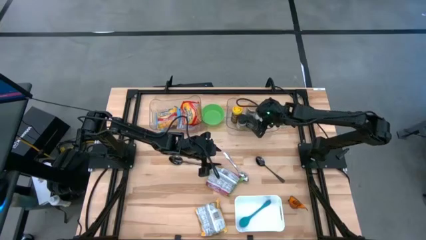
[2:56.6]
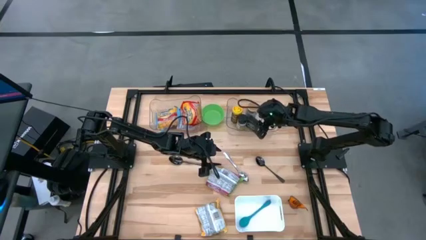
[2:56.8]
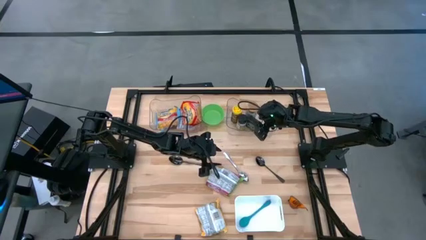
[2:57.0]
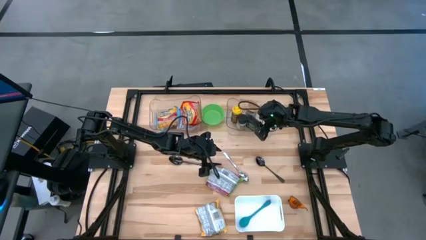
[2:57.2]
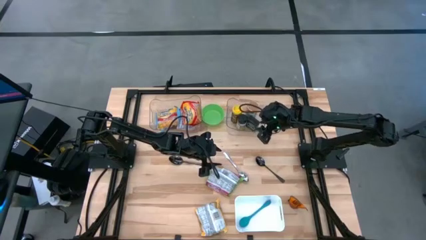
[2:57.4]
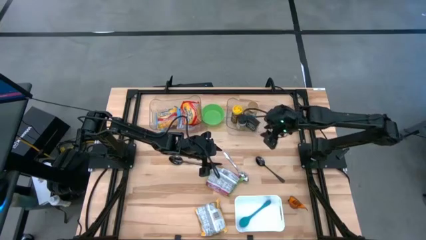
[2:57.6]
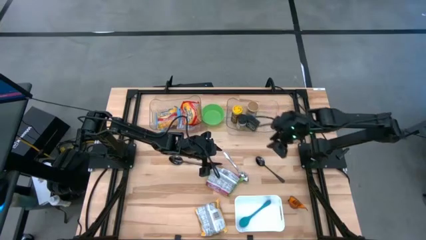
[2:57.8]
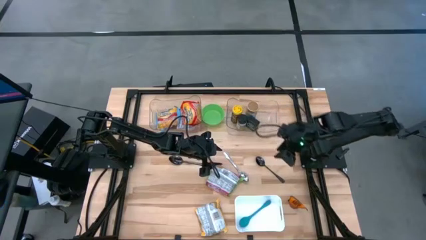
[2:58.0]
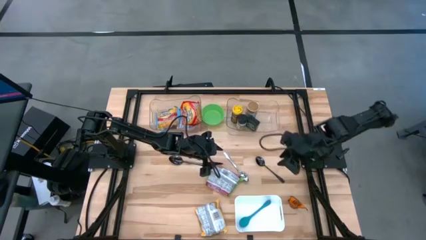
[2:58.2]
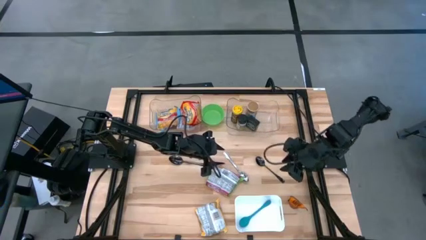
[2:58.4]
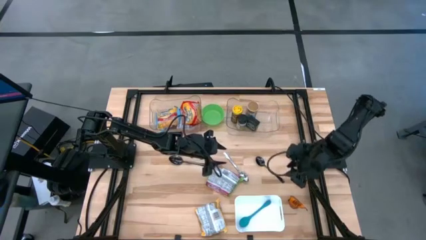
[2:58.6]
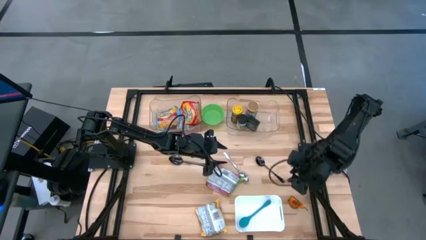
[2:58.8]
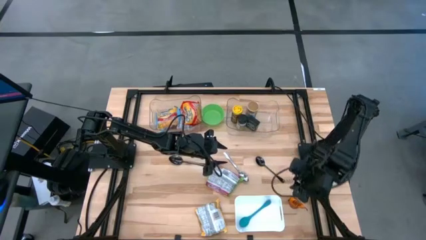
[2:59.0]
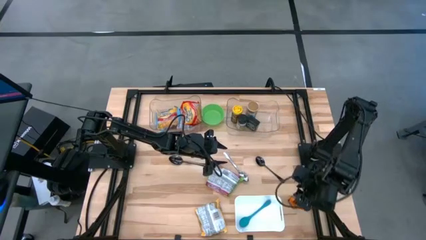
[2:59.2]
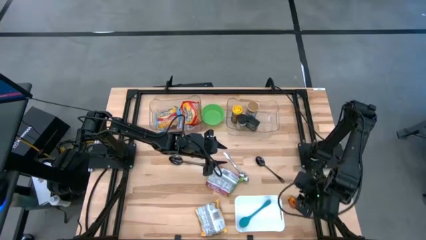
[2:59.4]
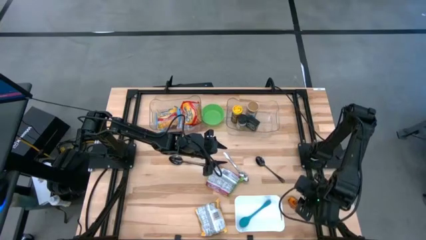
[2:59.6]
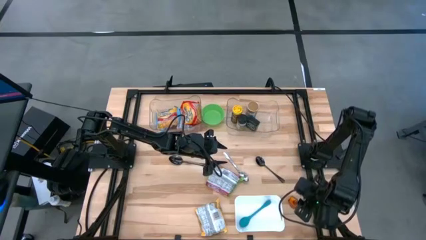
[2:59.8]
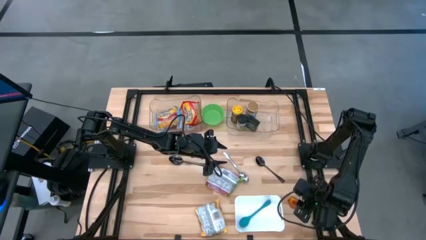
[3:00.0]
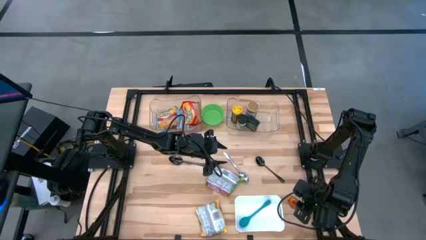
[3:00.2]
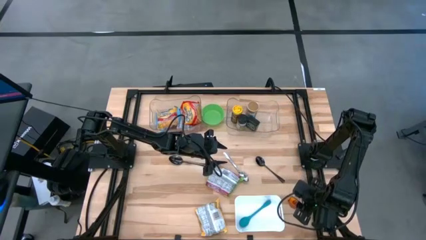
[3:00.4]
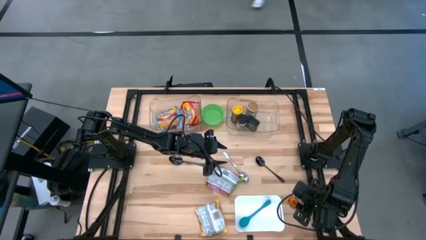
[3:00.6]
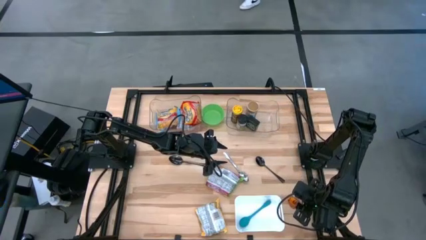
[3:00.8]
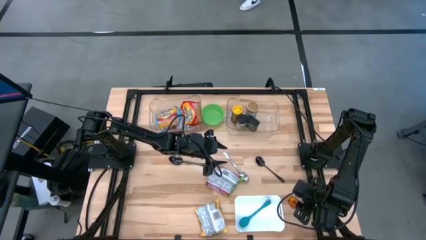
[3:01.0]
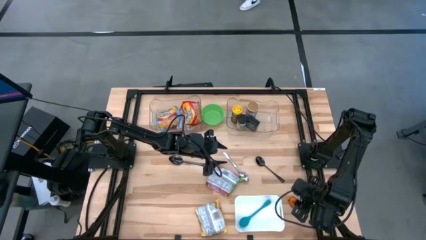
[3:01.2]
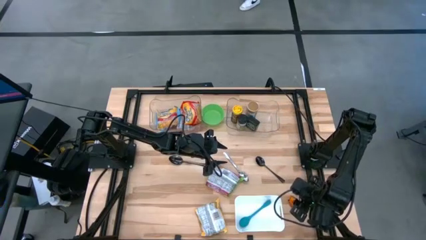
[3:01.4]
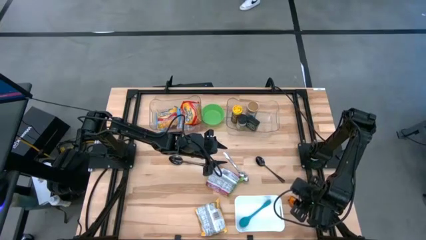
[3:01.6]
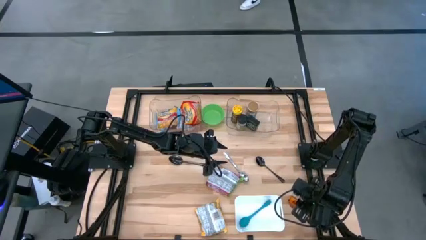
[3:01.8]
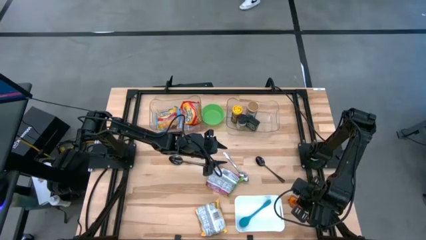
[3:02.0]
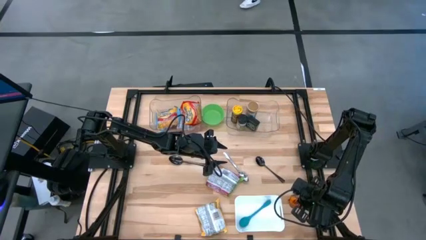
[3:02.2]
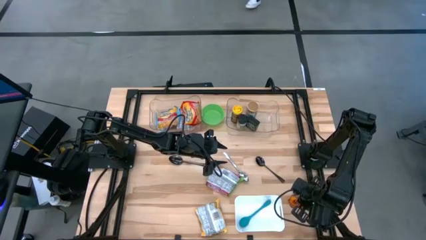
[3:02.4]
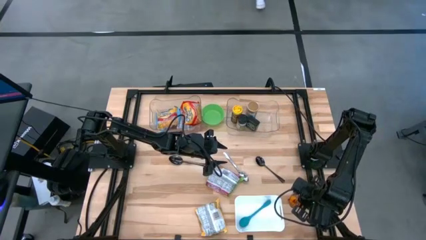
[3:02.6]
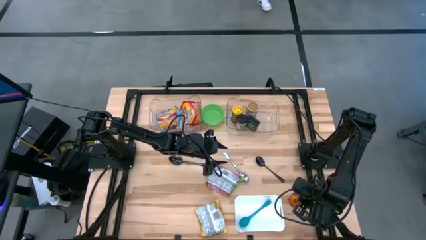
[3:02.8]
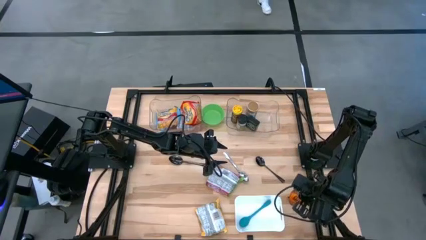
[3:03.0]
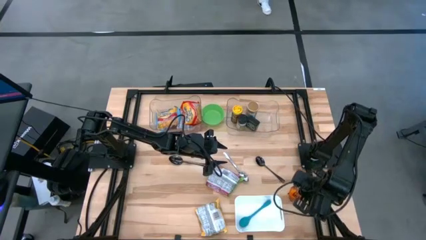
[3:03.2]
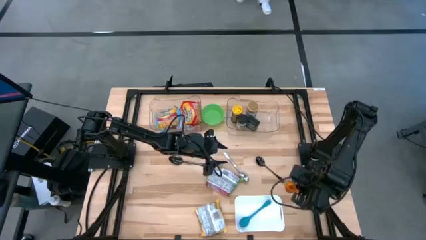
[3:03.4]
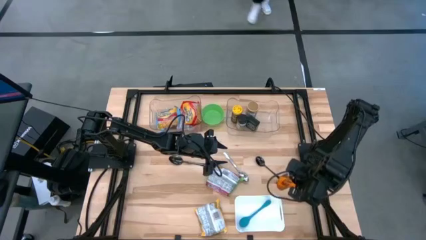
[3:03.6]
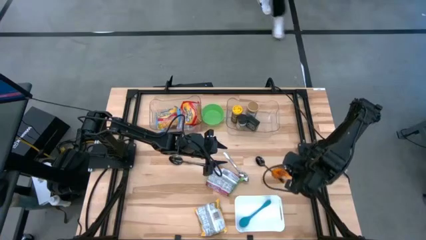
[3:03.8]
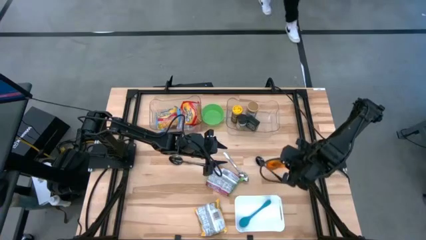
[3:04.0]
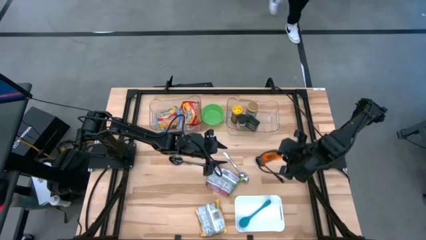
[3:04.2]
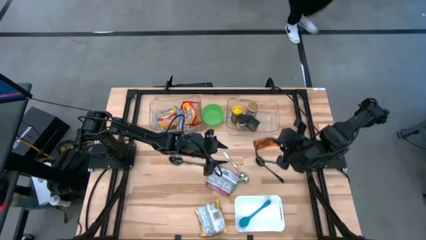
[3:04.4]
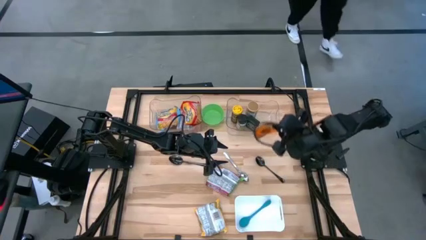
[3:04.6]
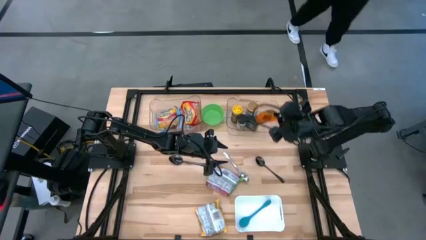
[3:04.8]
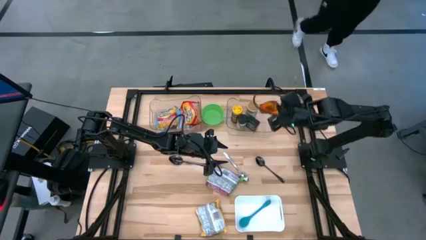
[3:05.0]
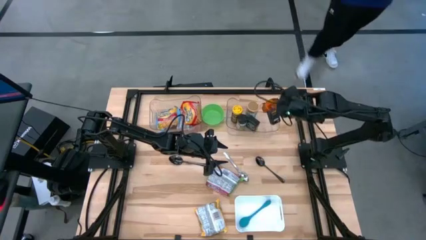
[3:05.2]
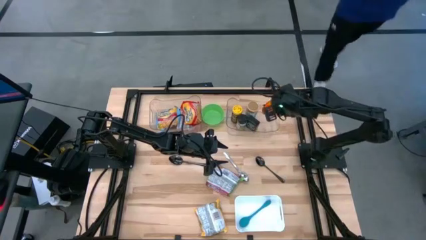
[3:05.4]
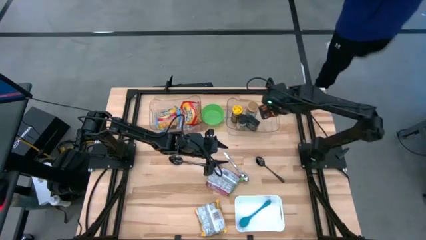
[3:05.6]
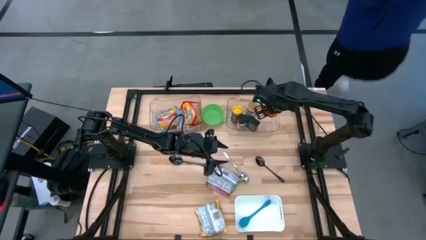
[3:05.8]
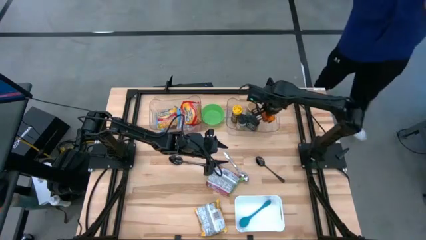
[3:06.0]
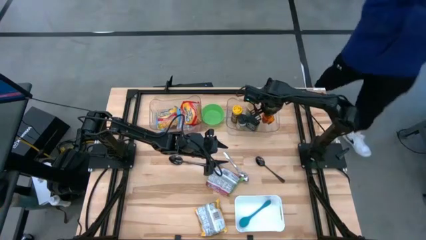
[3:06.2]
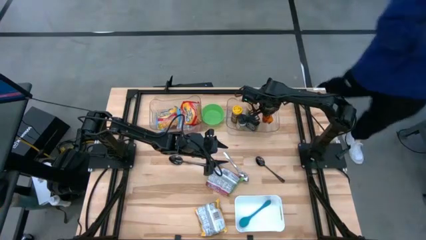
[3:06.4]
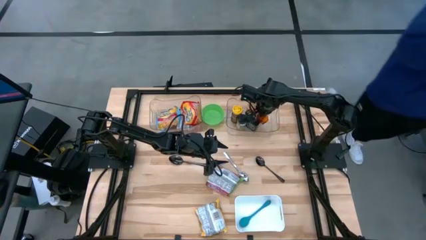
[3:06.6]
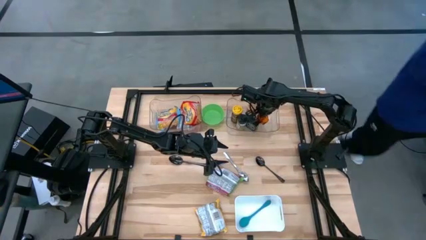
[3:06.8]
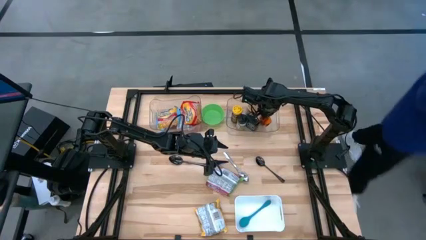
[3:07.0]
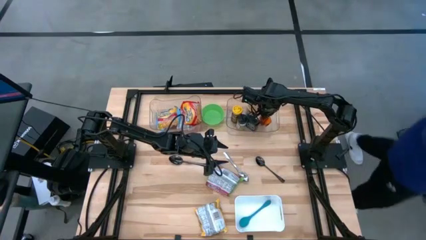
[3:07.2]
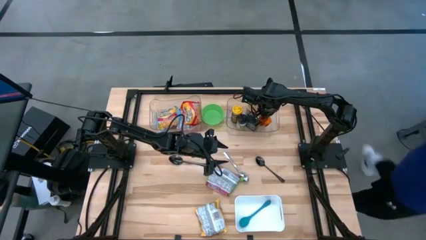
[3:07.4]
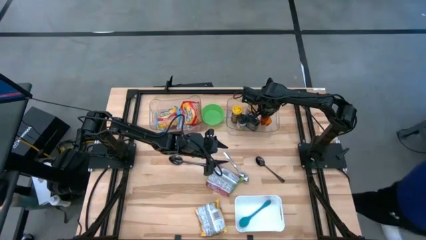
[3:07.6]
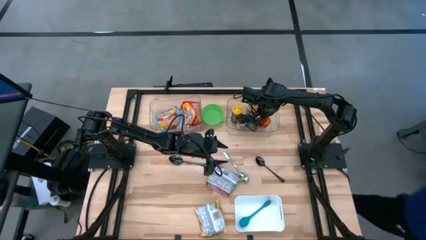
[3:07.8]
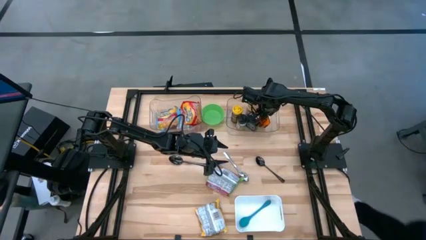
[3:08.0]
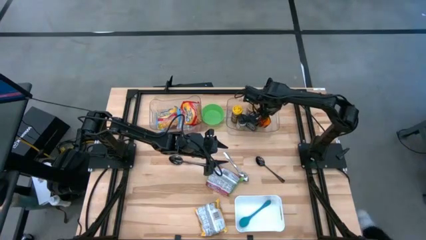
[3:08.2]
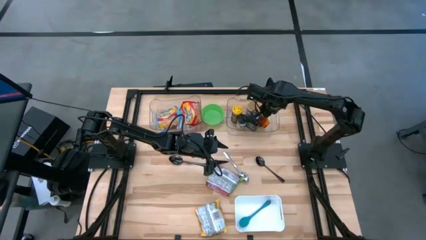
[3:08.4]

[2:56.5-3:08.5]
Task: Pick & Place Food Item
Put the orange spice pack in the right transparent bin
